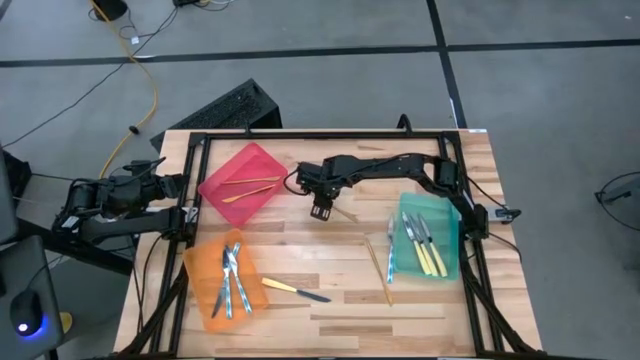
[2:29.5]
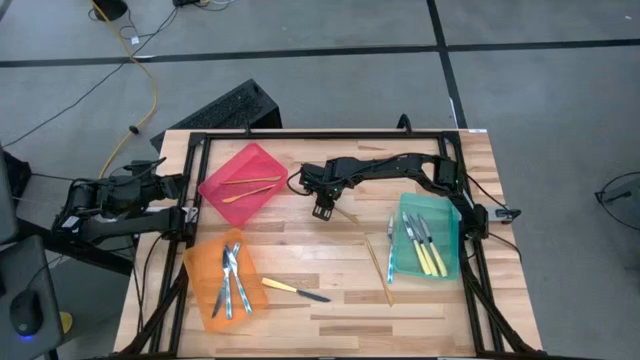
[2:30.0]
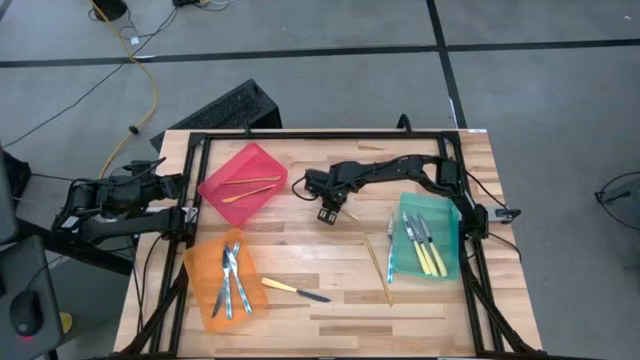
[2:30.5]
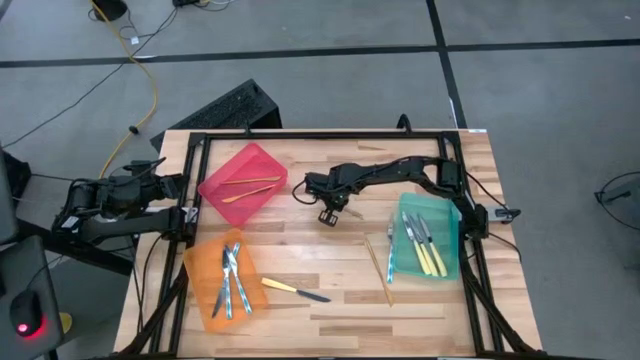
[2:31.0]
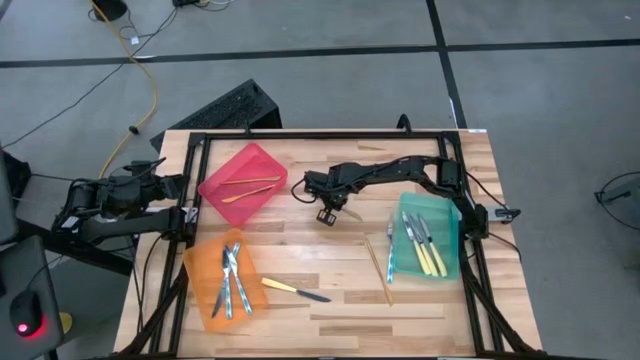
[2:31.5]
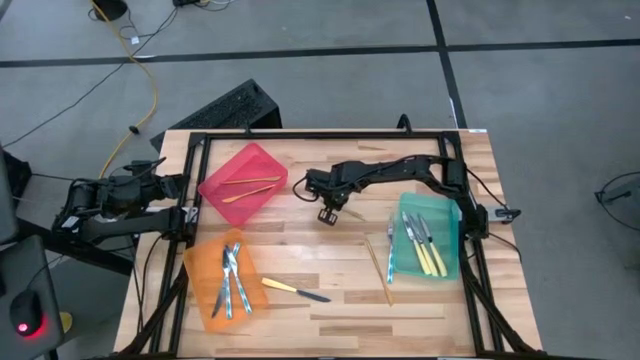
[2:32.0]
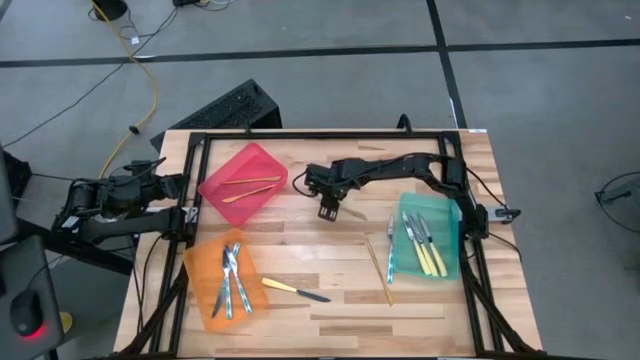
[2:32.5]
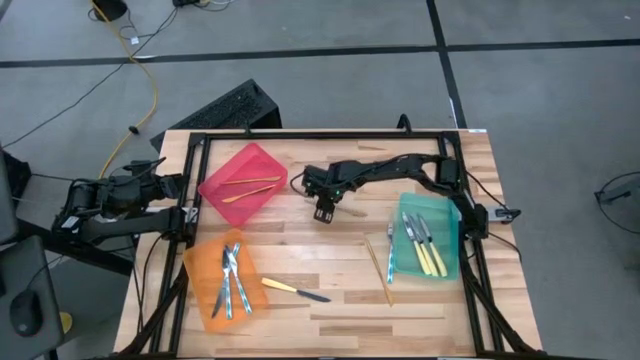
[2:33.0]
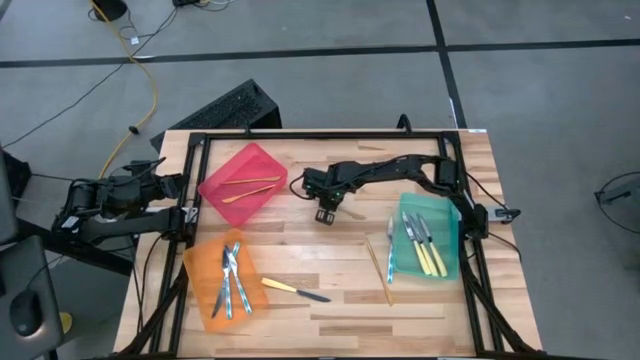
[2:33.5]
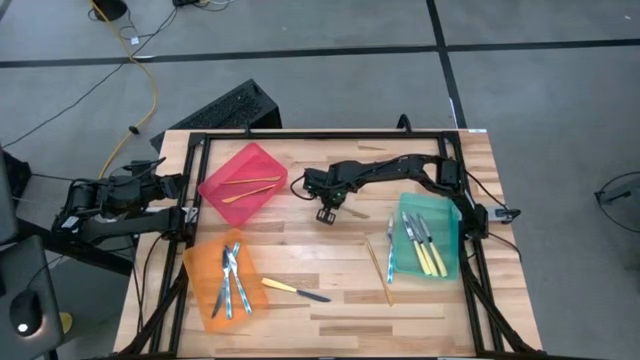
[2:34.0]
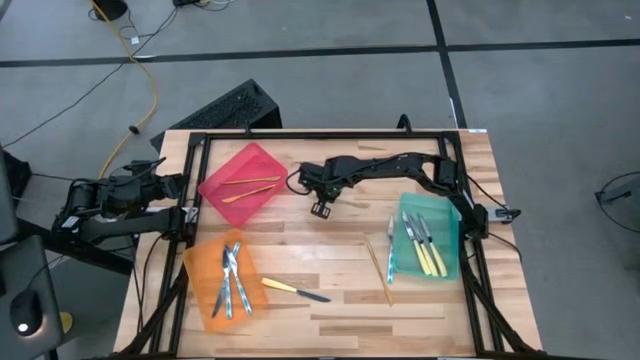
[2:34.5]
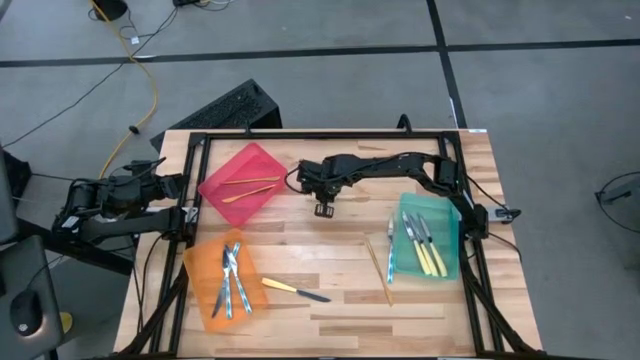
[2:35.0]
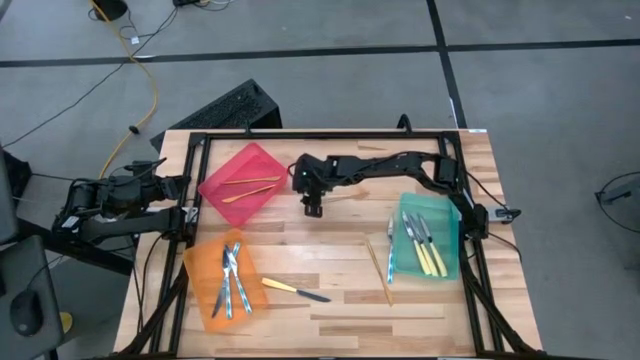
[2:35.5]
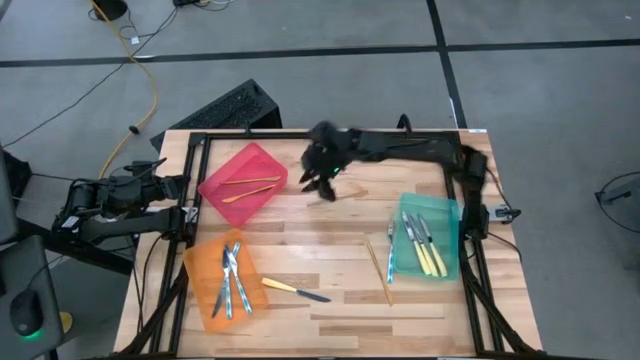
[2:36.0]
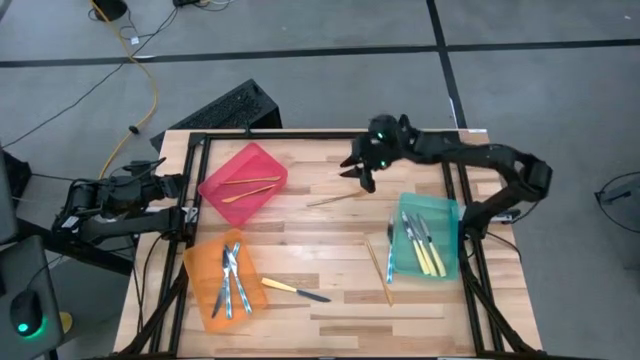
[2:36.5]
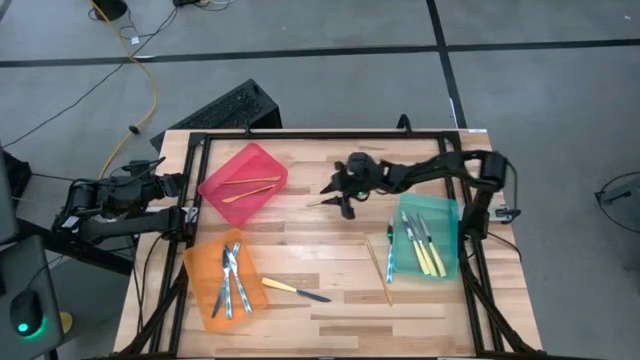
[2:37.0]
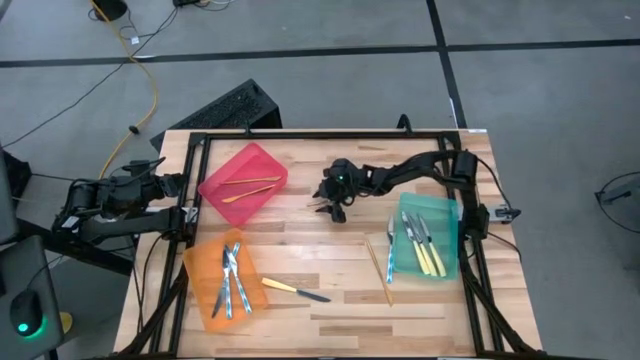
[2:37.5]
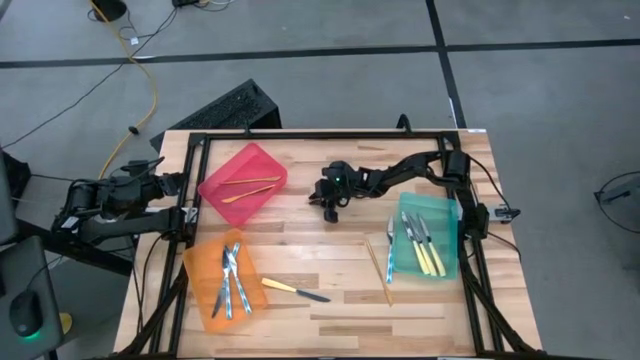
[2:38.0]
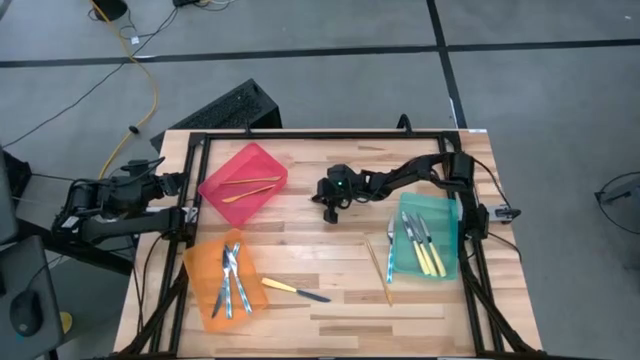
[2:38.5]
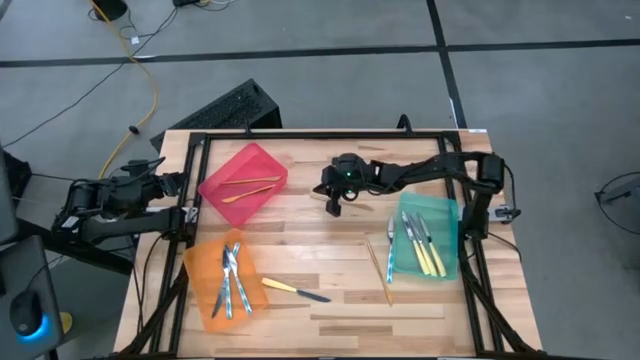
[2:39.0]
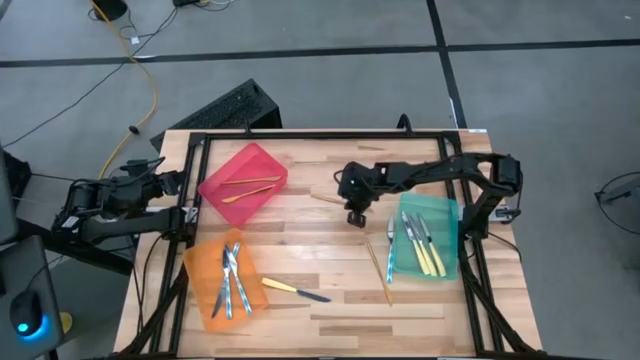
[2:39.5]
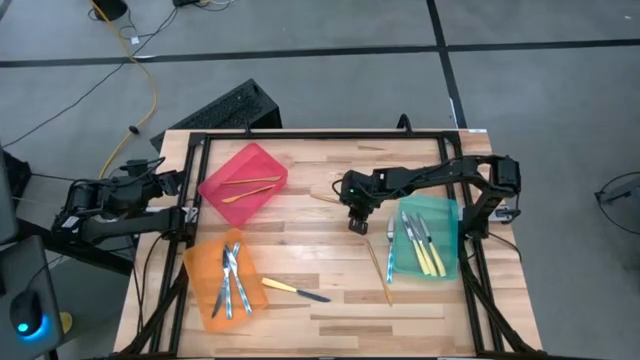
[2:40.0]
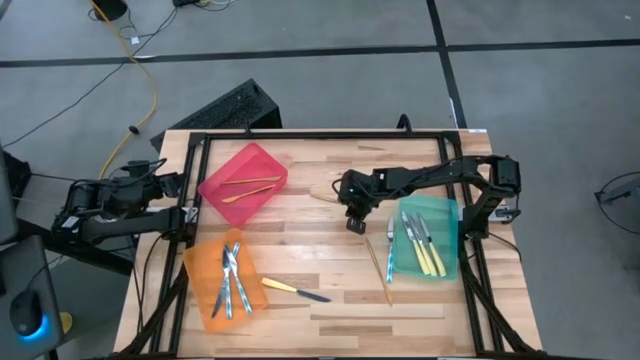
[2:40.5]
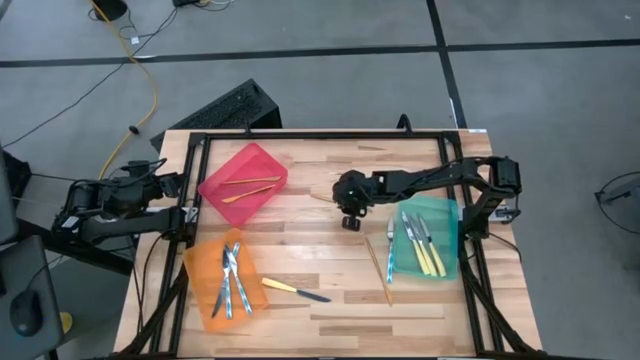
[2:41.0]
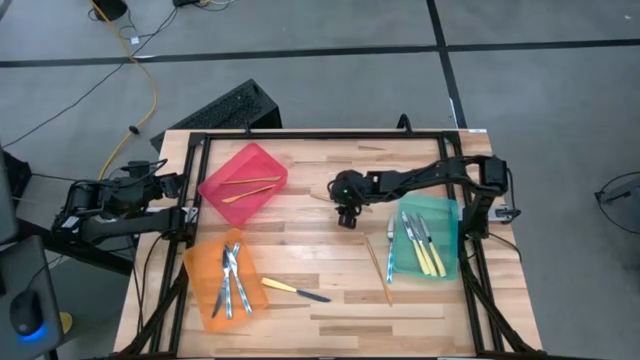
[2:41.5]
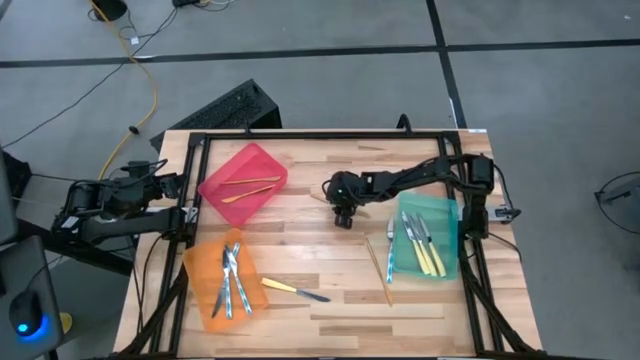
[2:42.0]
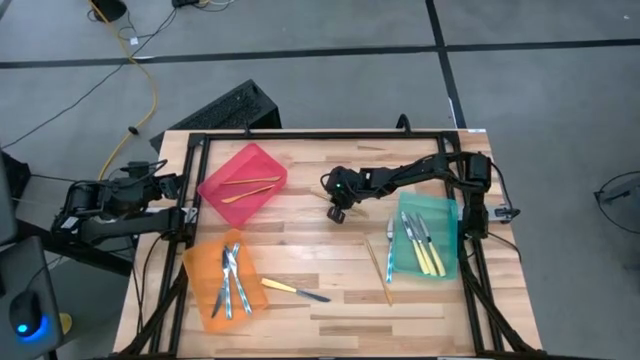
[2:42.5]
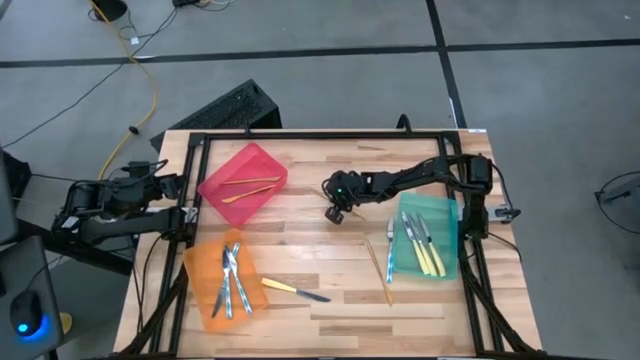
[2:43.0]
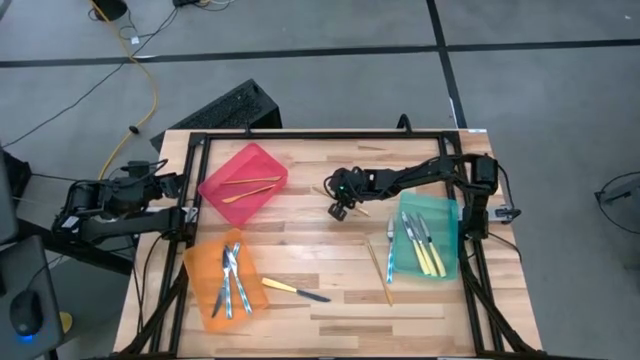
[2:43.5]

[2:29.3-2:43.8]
Task: Sort silverware by color (type)
Put the top gold knife into the red bin

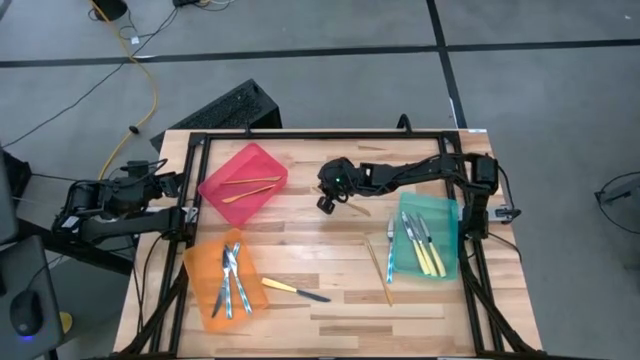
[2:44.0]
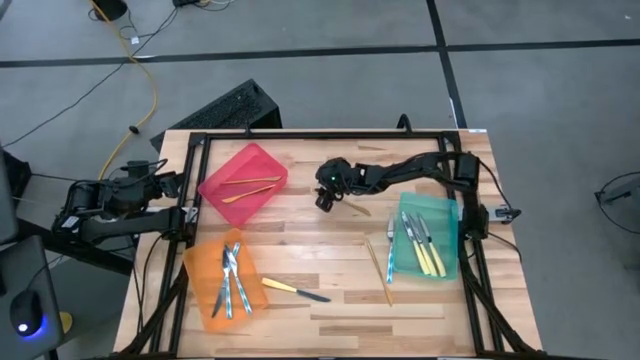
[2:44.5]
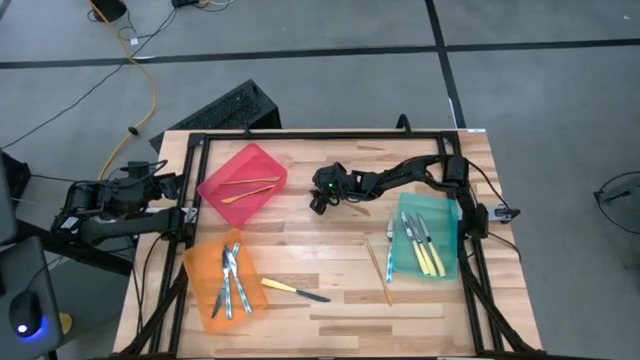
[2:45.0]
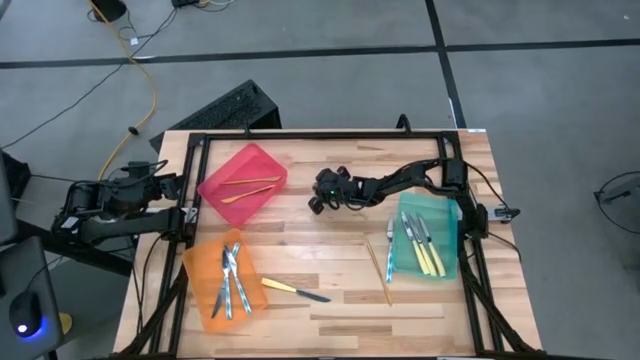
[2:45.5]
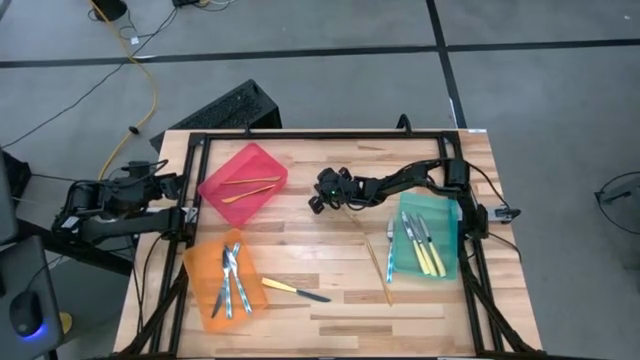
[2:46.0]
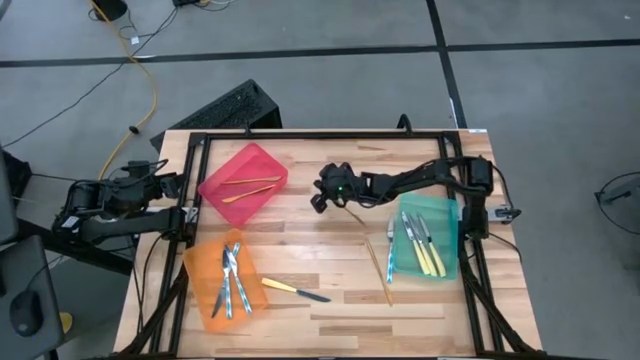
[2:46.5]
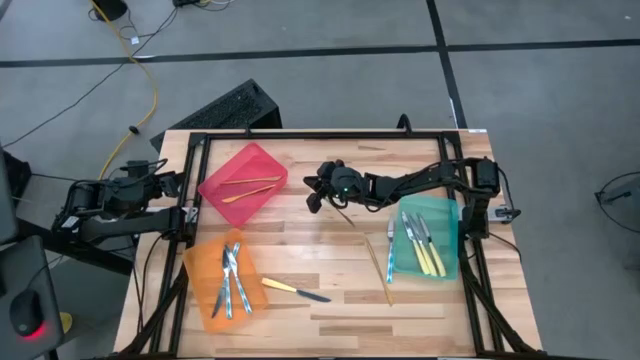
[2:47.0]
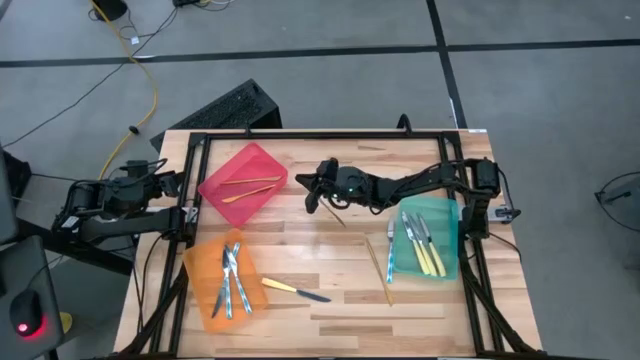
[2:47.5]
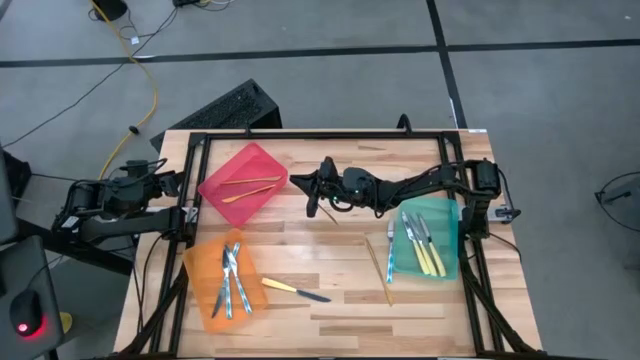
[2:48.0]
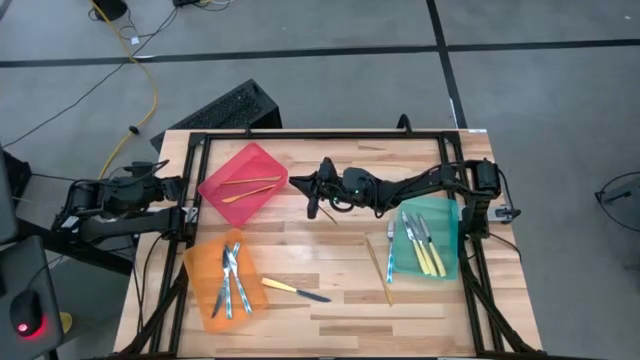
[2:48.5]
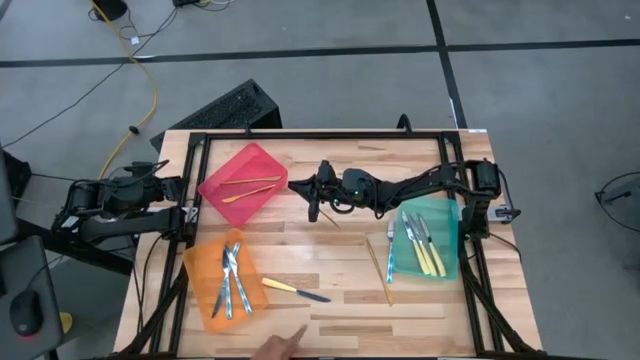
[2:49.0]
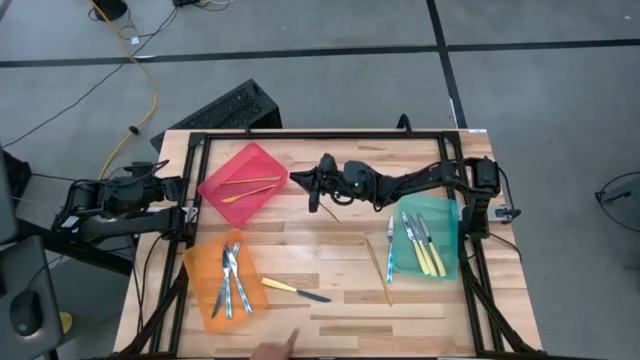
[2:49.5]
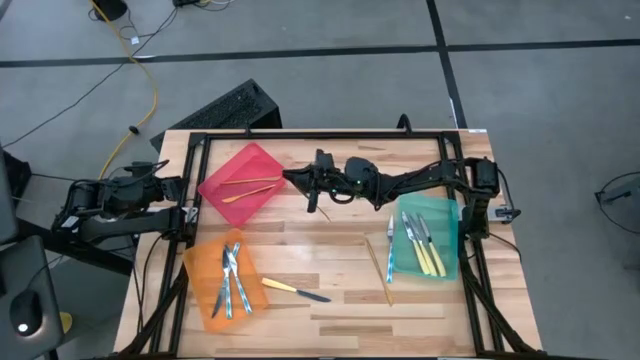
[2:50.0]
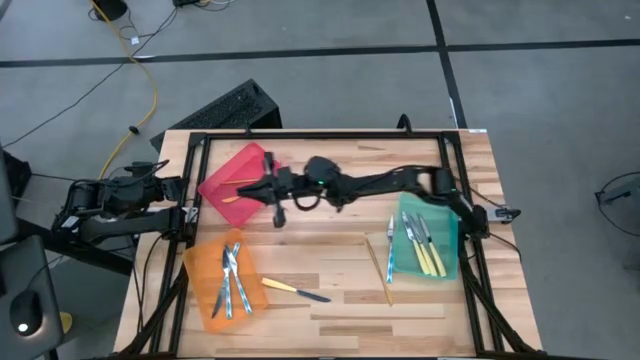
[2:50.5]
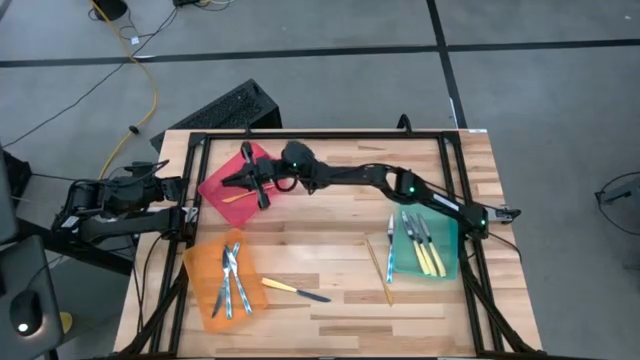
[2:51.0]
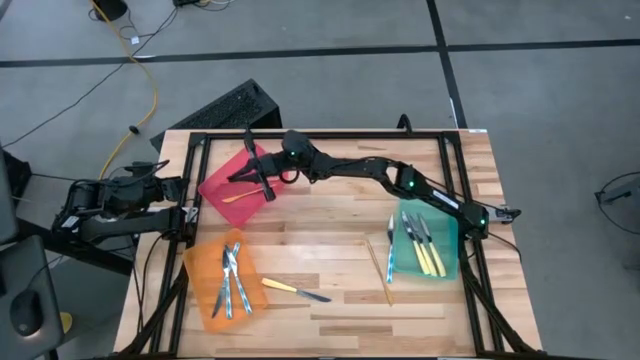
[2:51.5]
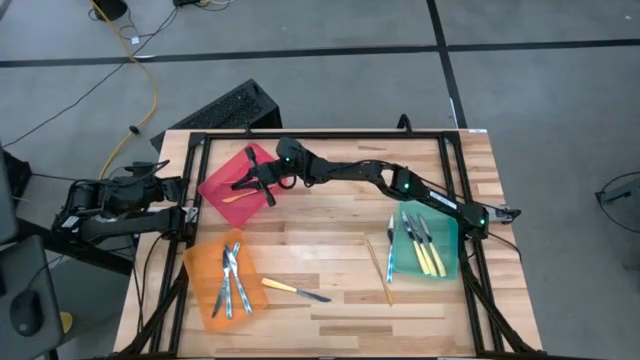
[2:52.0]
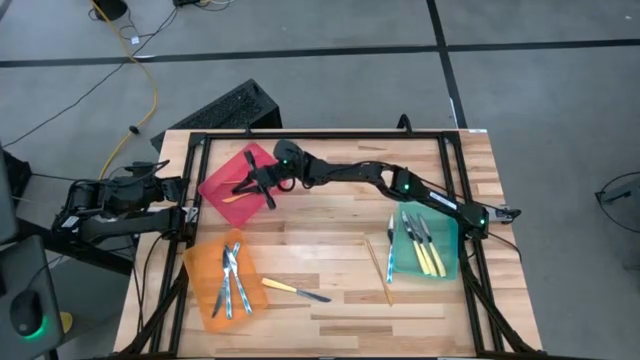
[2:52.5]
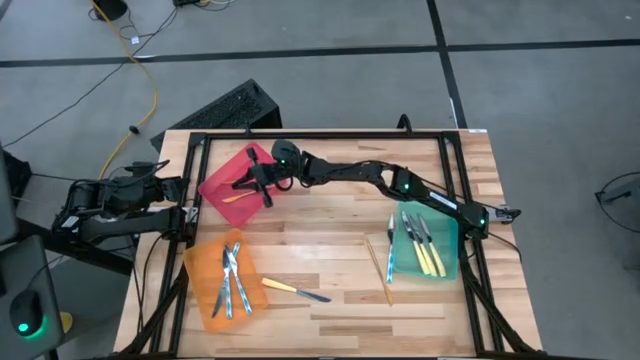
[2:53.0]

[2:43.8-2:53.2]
Put the top gold knife into the red bin
